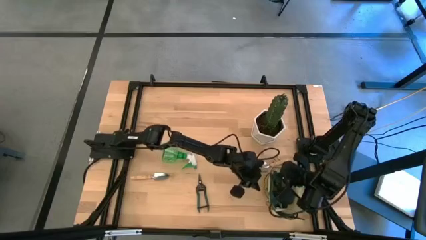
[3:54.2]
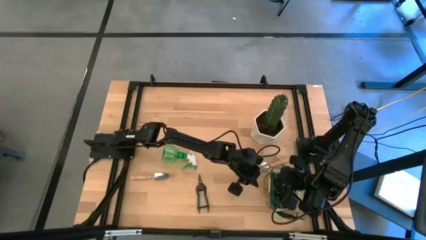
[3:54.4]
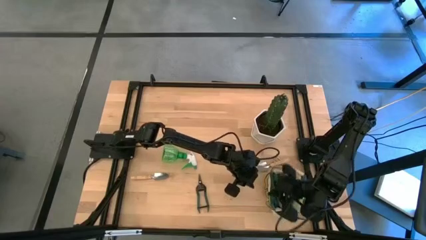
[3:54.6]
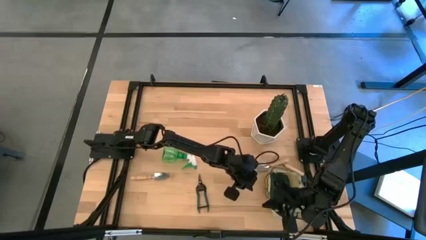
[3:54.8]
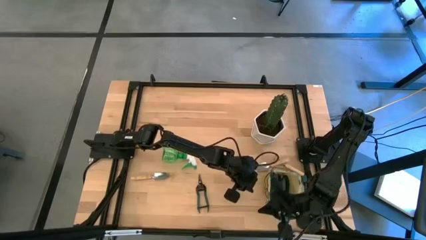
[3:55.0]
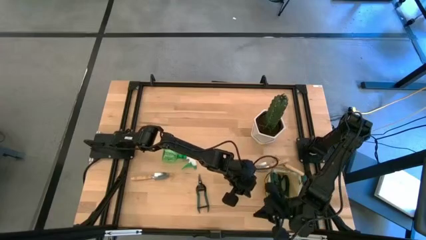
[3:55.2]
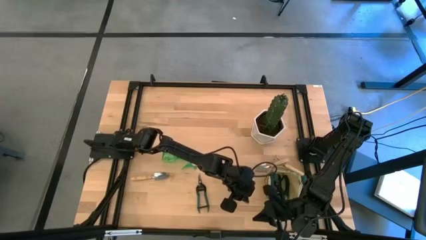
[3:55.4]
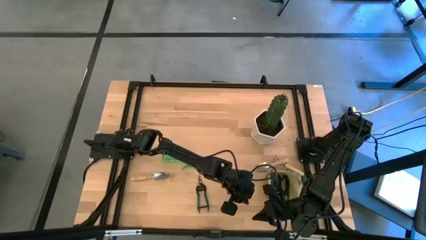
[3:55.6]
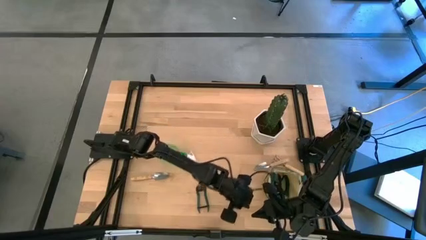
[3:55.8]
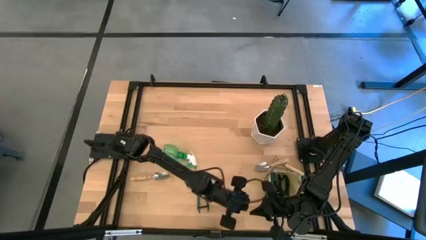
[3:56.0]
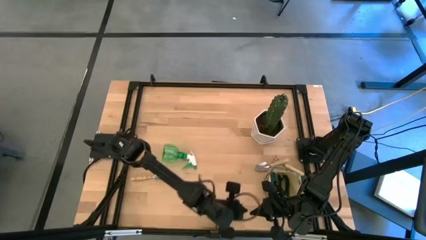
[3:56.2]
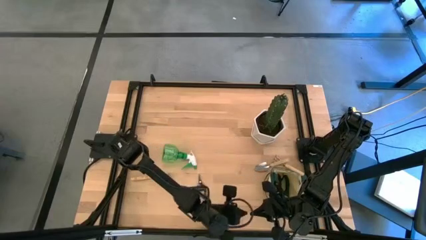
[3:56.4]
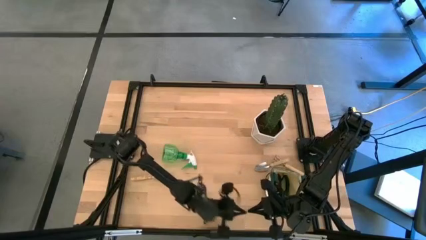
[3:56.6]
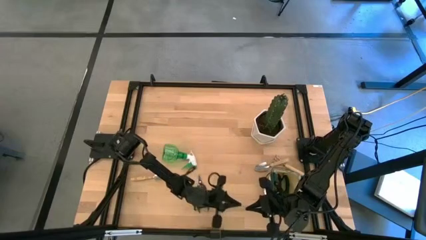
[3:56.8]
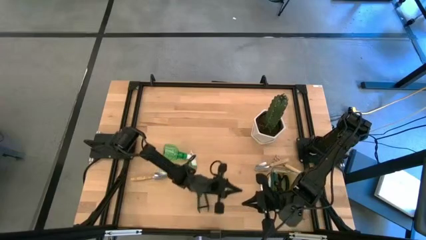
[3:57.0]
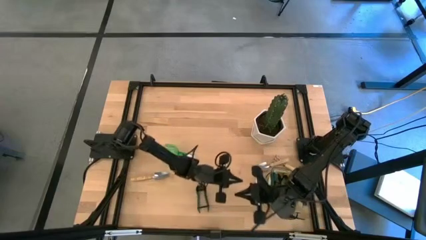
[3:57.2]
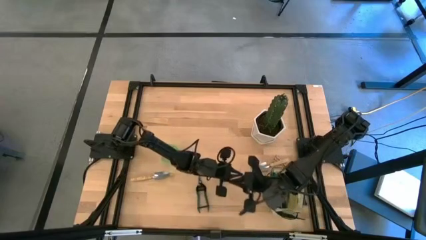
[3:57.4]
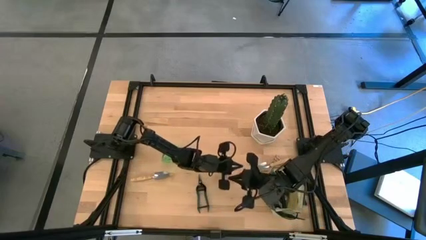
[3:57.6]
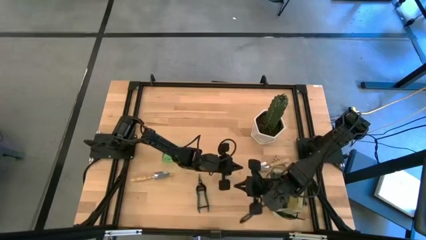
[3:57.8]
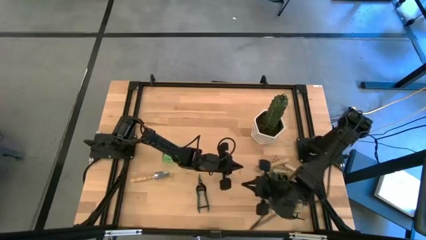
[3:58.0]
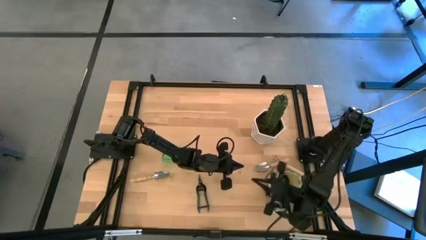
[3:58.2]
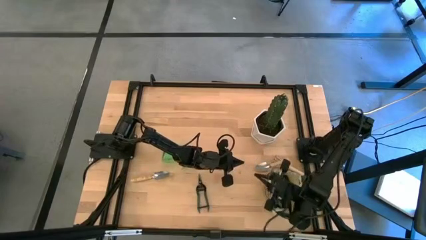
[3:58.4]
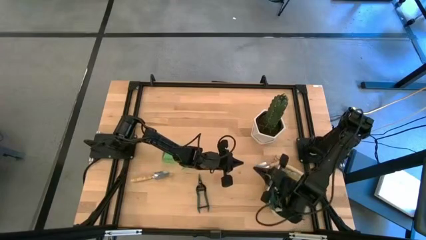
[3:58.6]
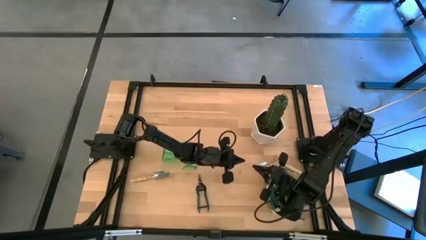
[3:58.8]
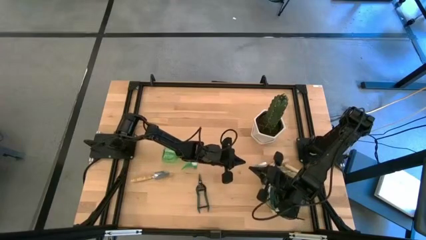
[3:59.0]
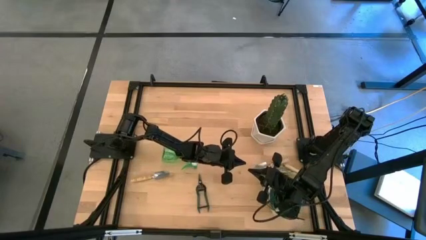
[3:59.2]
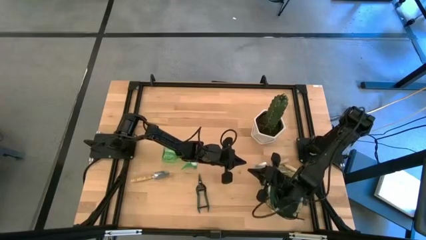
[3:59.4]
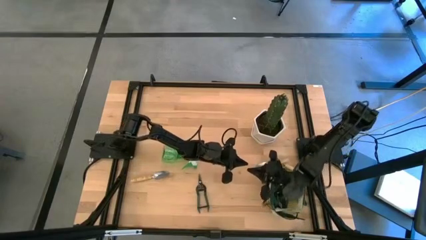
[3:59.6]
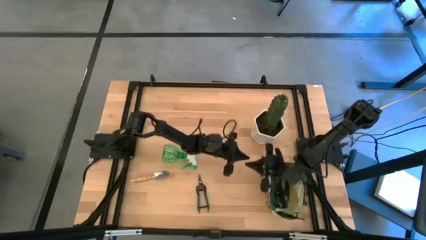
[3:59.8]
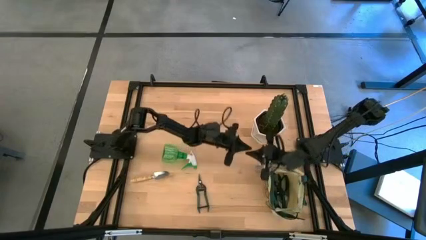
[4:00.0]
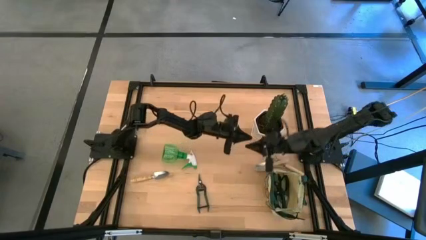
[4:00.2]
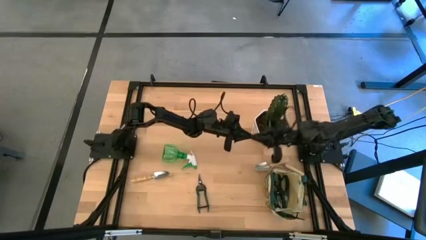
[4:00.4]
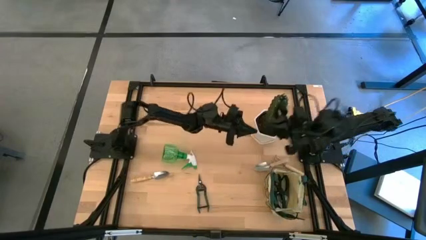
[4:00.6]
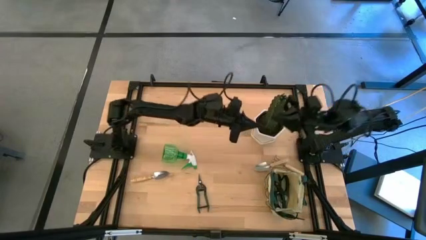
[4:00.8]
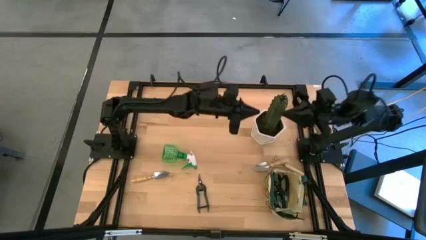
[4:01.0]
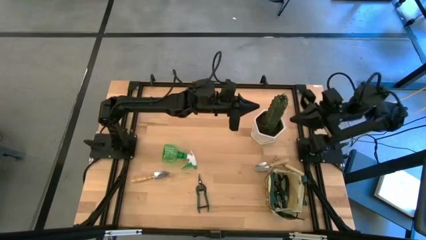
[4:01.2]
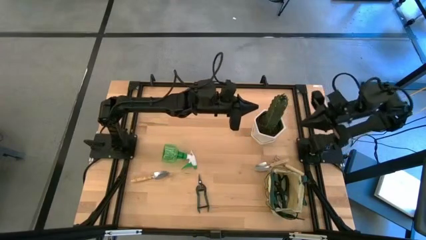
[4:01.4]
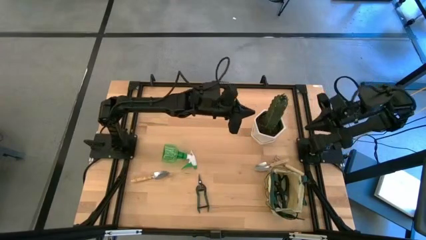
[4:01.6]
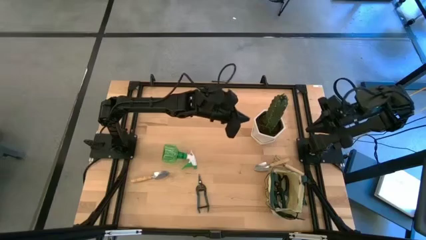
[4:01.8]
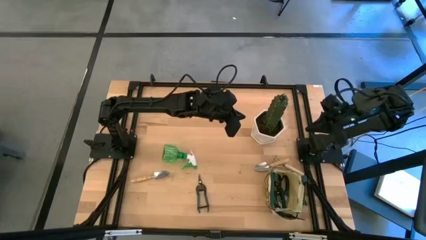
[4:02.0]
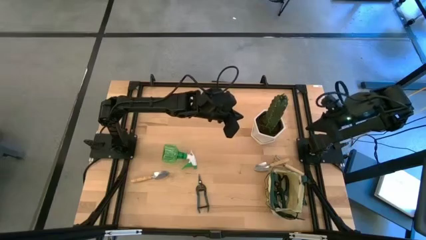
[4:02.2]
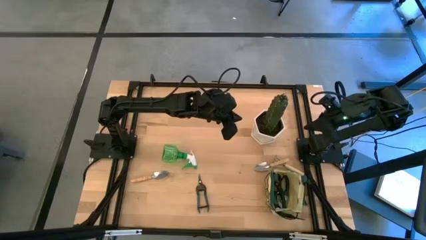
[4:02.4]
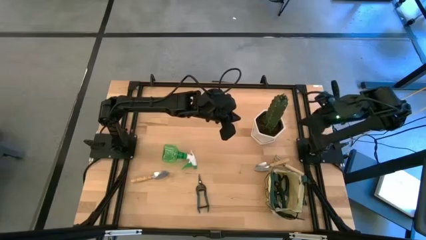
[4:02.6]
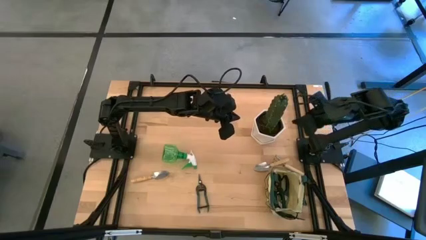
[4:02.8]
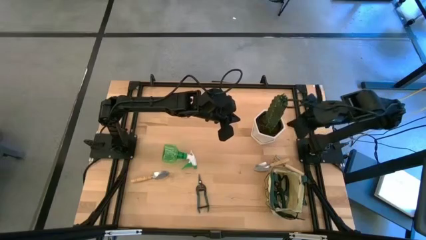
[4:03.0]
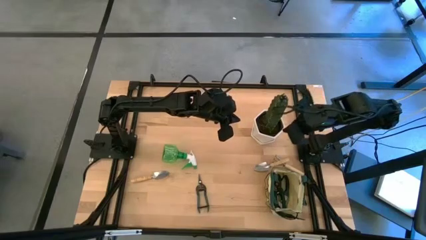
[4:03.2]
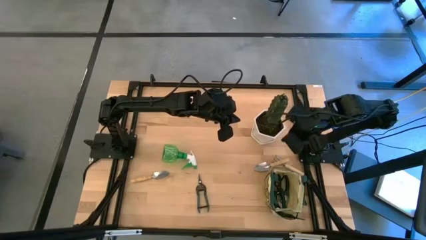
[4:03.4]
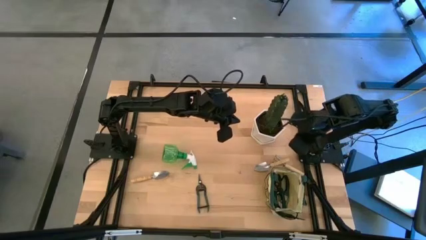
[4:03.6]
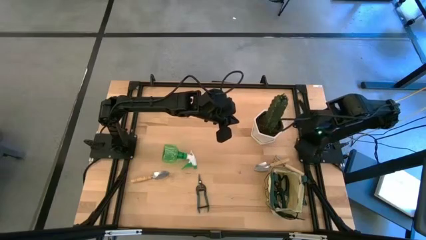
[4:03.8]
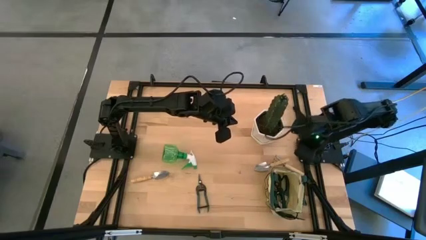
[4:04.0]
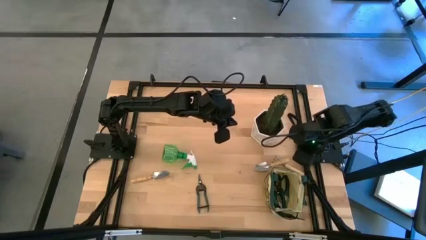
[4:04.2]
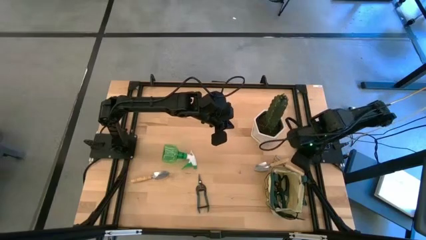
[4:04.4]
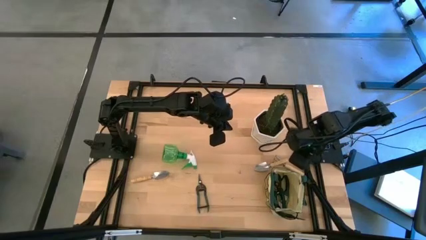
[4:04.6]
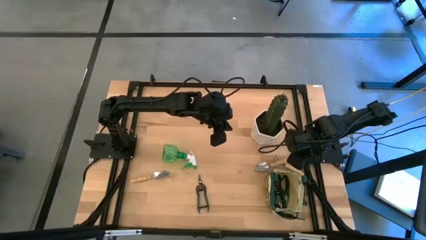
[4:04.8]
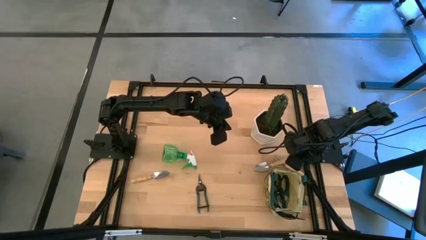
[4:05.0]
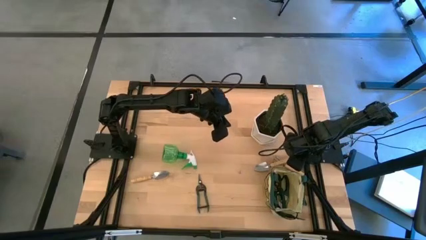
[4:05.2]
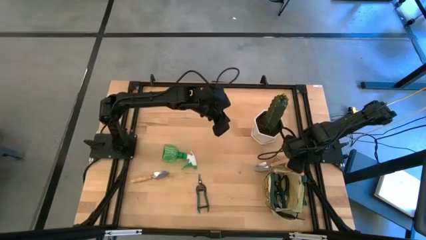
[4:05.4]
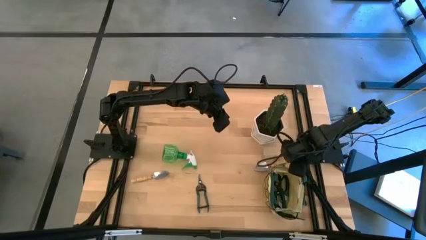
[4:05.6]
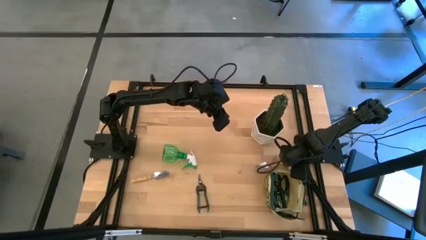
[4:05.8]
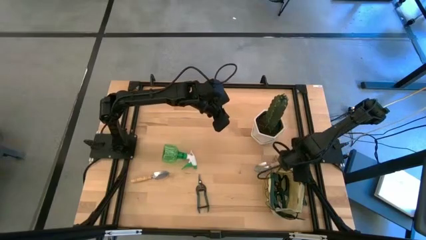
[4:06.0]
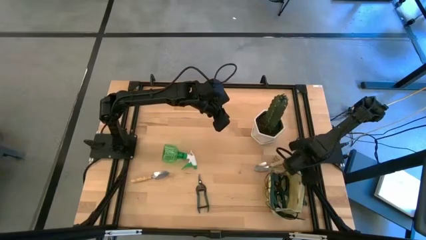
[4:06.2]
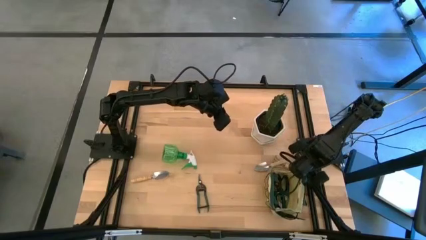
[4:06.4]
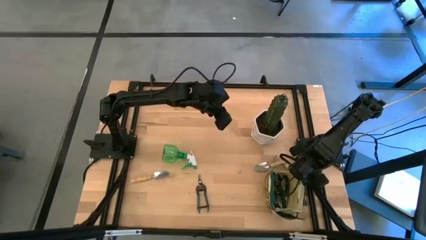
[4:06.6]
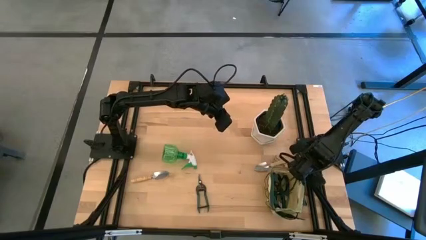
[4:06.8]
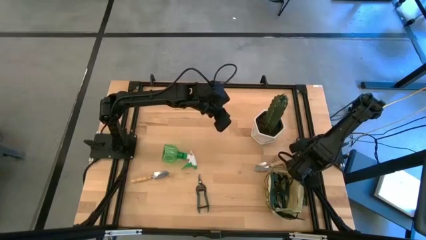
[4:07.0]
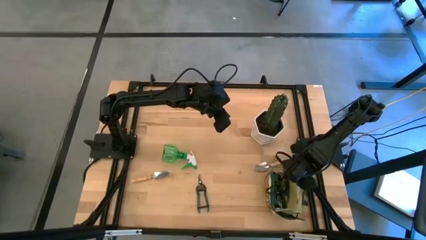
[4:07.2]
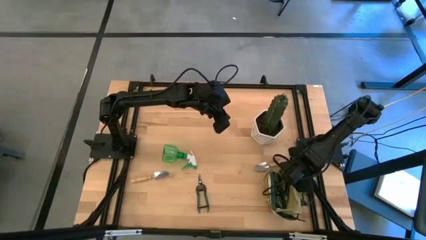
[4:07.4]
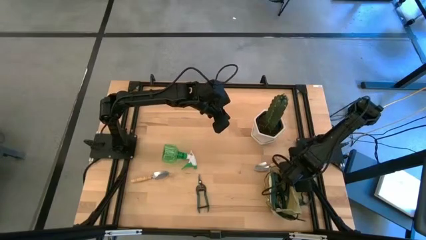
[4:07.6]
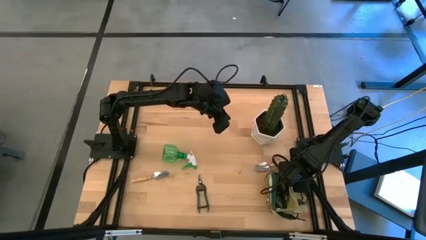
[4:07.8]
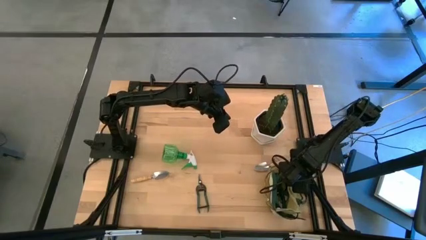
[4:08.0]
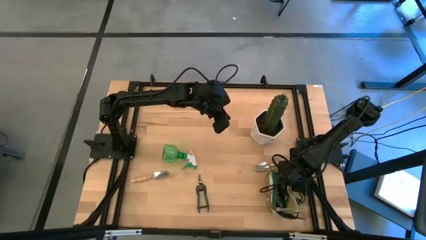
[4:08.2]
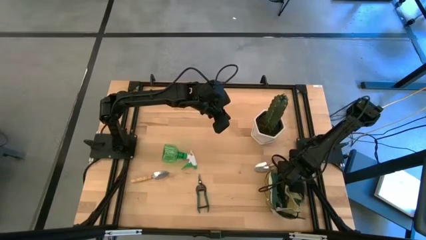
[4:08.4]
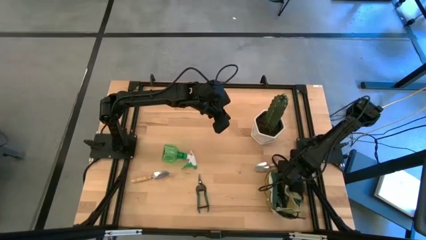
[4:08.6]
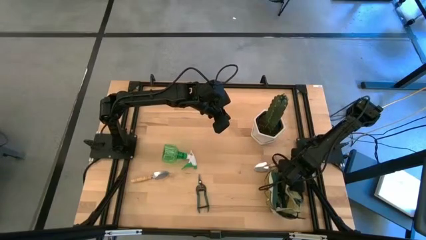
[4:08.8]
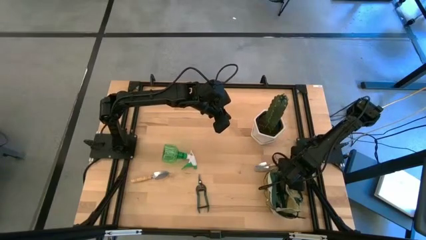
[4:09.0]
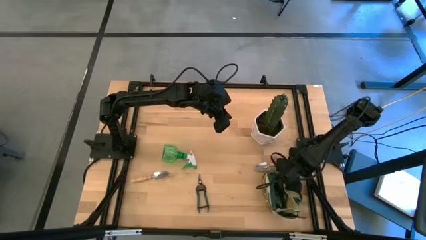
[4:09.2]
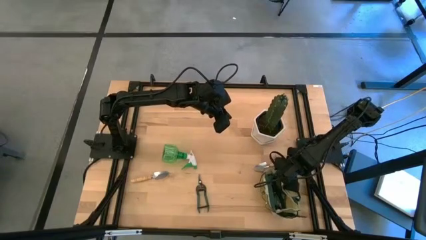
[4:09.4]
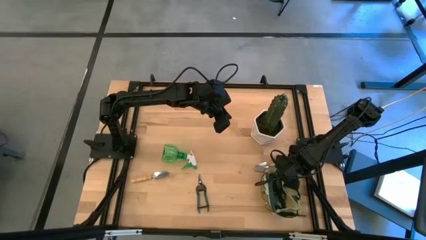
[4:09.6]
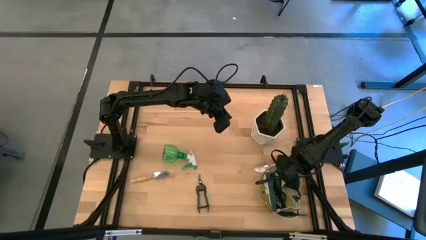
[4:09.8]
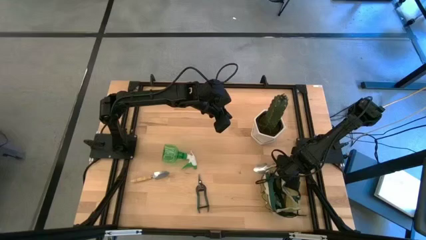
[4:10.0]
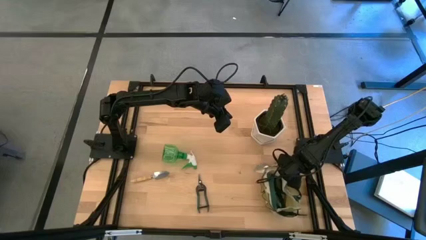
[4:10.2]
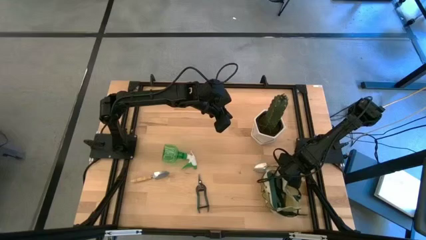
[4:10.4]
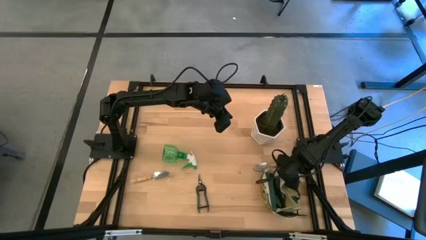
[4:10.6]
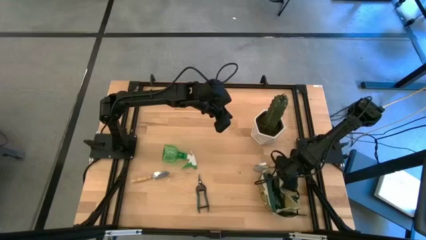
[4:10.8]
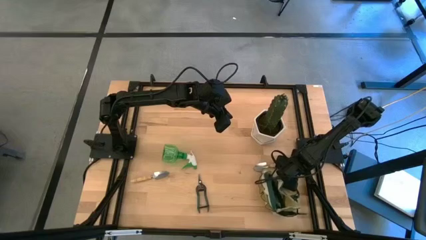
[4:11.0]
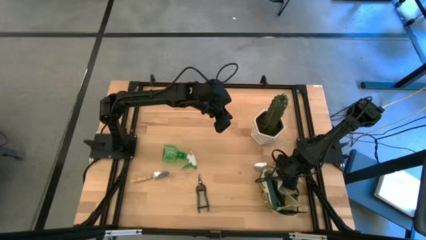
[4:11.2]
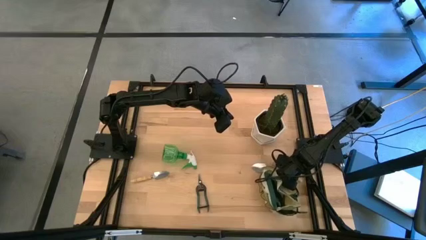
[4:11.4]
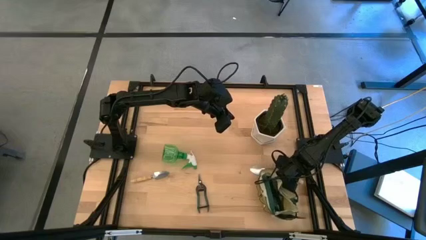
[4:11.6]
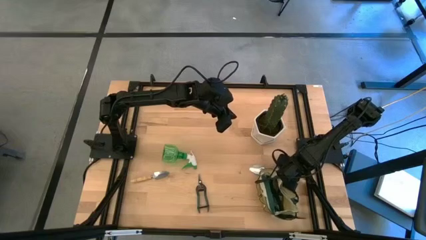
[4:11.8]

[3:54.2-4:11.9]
Task: Pick & Place Garden tools in Gardening bag
Put the hand rake into the side pocket of the white bag
